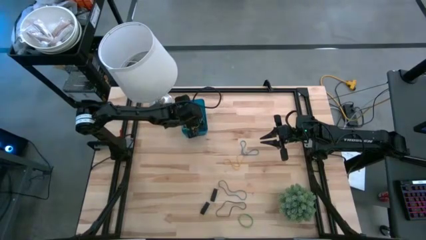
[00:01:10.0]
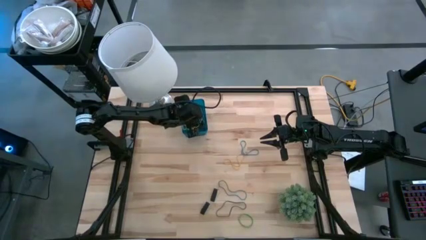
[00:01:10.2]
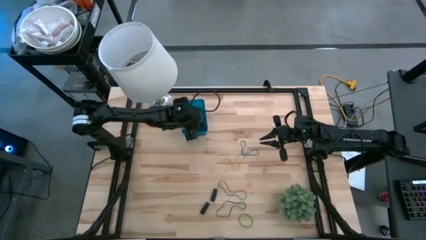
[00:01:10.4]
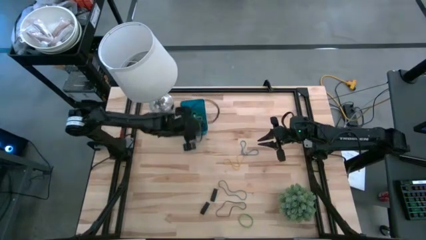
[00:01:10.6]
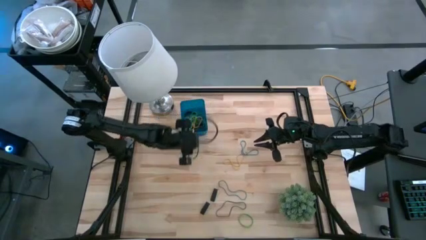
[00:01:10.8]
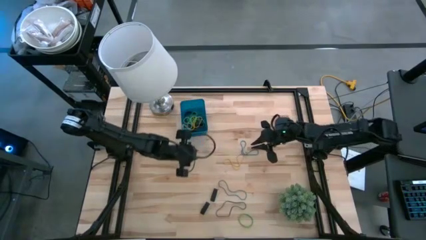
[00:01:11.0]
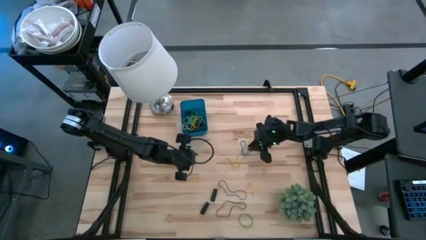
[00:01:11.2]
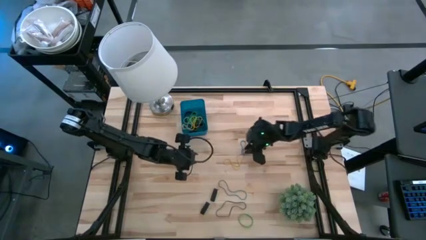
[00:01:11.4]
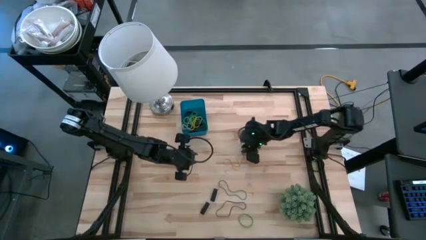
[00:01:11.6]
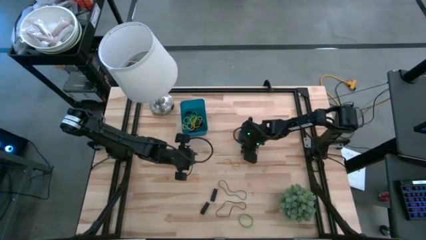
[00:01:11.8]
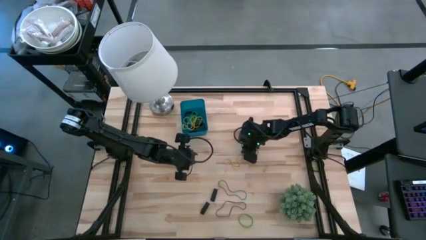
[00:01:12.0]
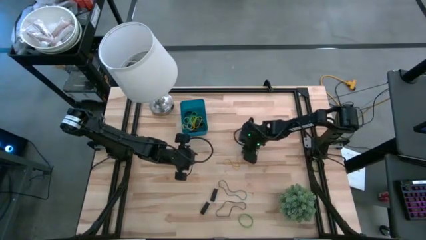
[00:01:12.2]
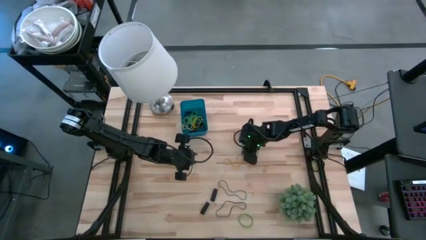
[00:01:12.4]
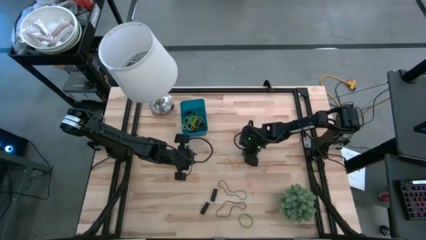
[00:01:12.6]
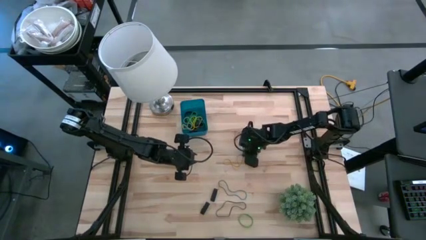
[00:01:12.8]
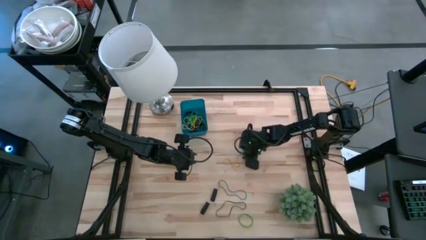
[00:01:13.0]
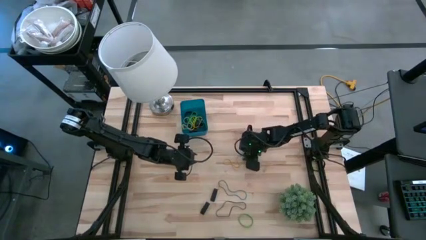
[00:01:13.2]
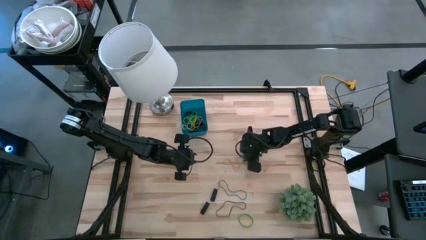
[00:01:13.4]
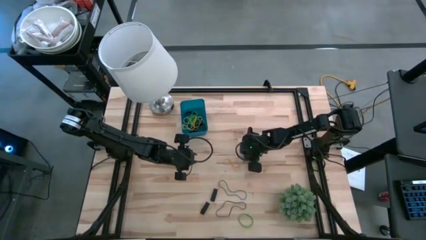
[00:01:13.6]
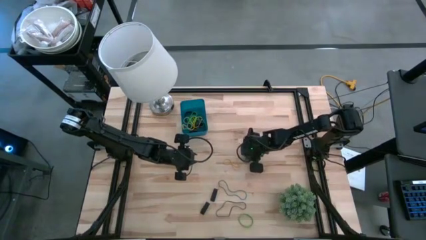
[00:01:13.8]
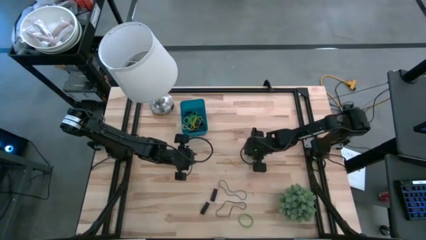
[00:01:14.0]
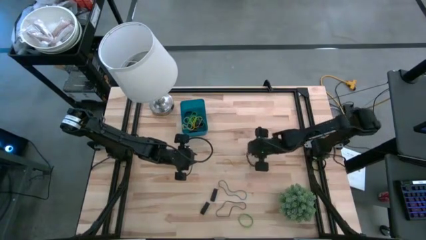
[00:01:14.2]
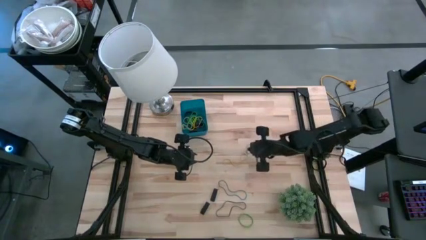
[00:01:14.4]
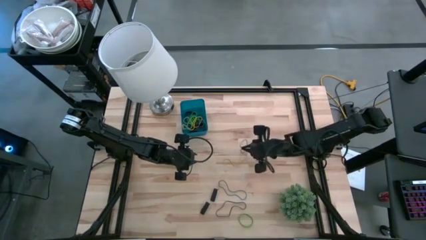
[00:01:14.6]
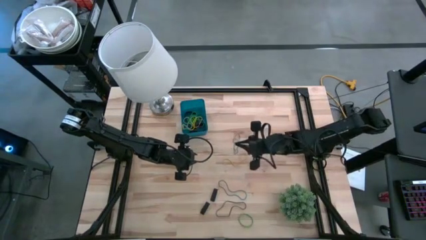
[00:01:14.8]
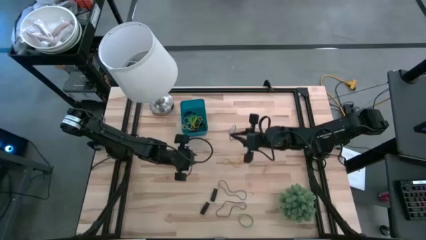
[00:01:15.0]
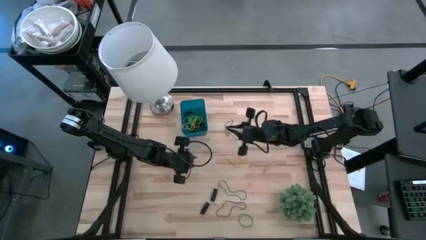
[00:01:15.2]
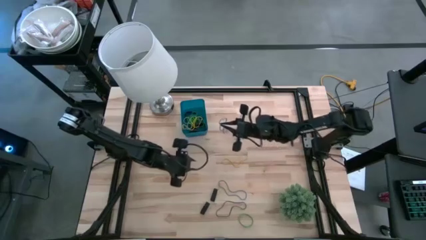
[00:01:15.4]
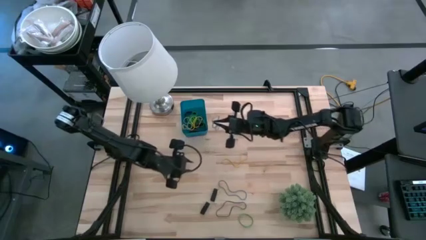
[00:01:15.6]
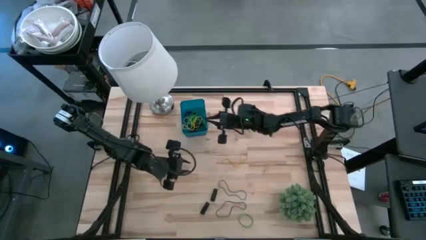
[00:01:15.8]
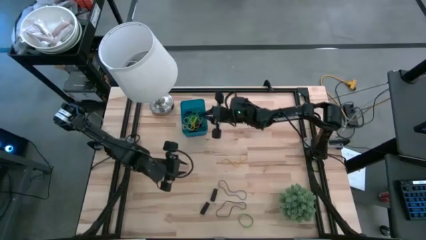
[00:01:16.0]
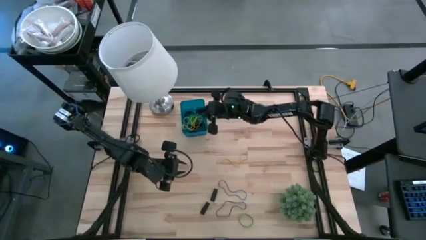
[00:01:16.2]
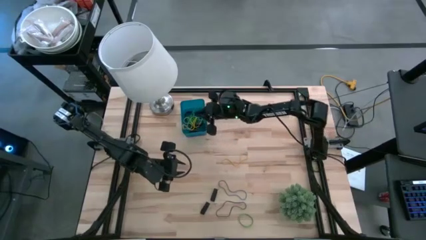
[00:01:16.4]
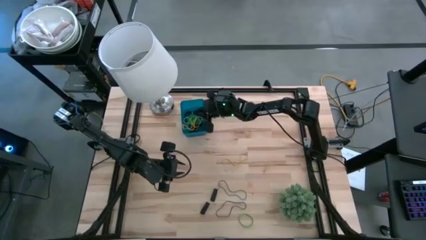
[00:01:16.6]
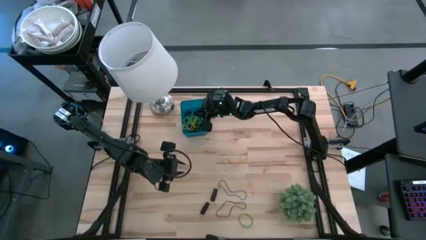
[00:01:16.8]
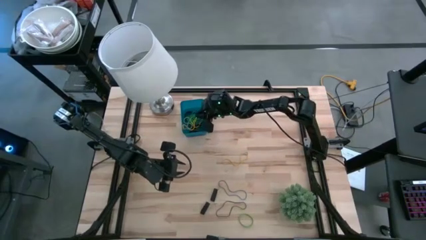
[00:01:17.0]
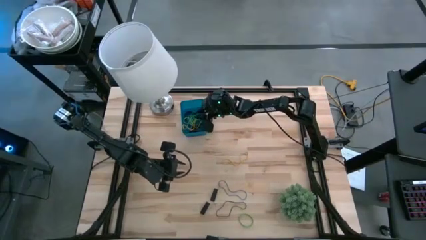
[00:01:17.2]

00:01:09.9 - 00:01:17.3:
Task: Pick and place rubber bands into bin
Put the top blue rubber band into the blue bin

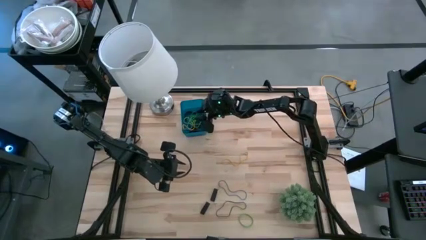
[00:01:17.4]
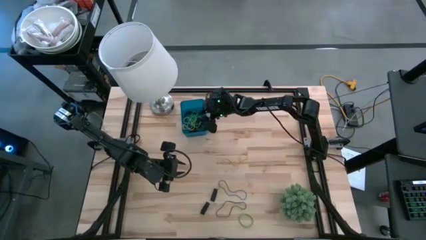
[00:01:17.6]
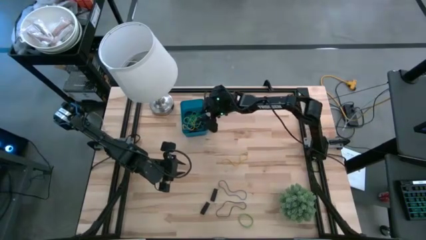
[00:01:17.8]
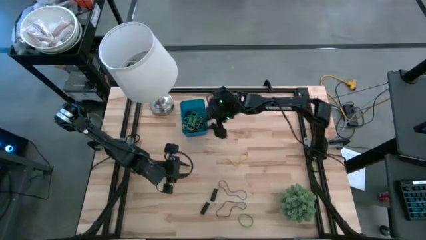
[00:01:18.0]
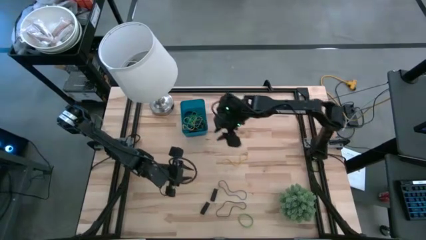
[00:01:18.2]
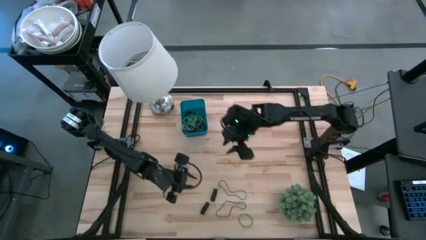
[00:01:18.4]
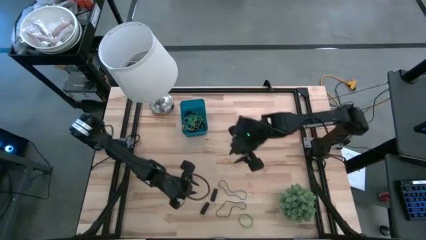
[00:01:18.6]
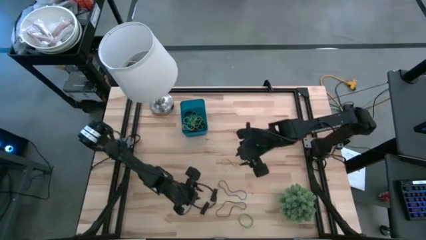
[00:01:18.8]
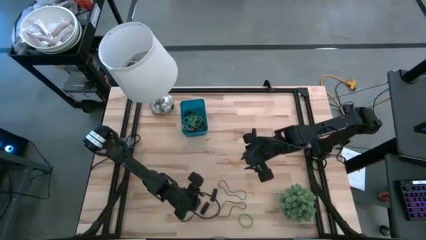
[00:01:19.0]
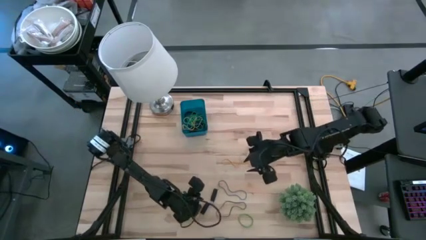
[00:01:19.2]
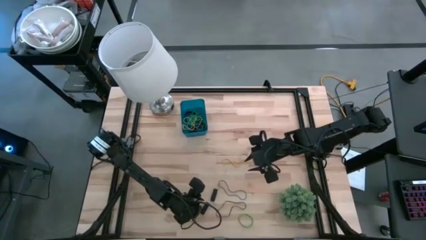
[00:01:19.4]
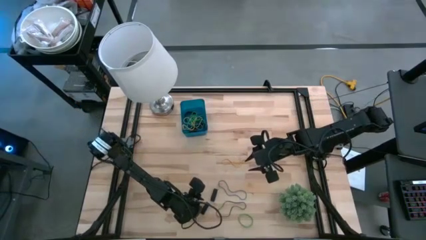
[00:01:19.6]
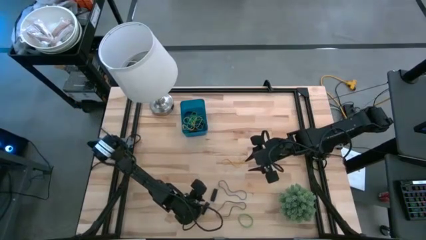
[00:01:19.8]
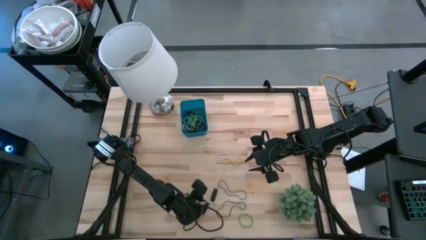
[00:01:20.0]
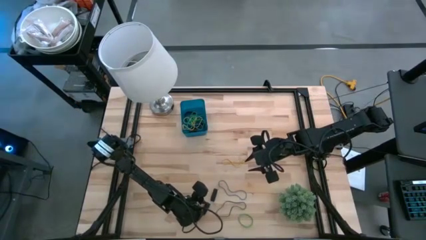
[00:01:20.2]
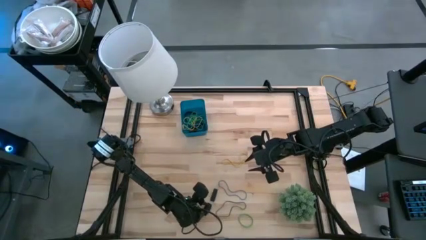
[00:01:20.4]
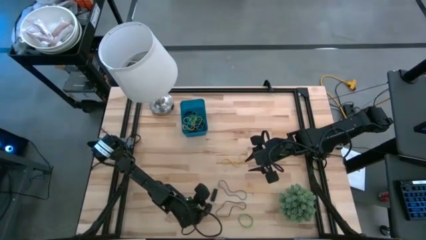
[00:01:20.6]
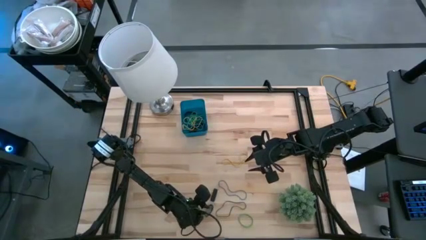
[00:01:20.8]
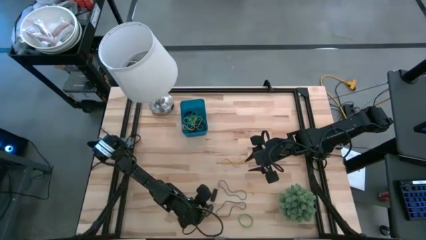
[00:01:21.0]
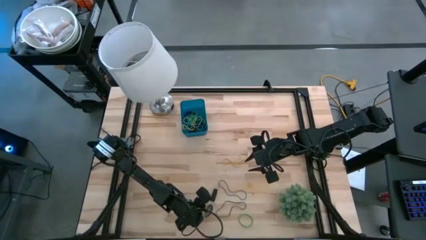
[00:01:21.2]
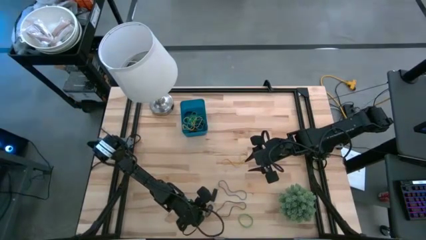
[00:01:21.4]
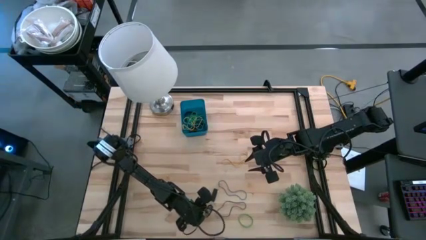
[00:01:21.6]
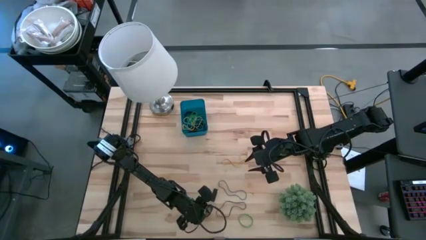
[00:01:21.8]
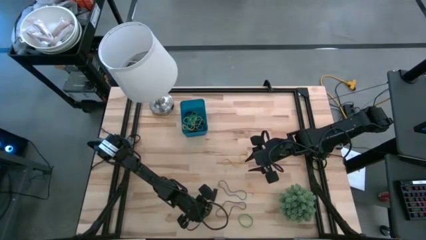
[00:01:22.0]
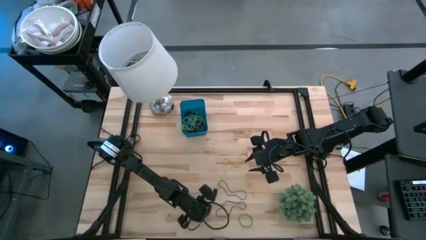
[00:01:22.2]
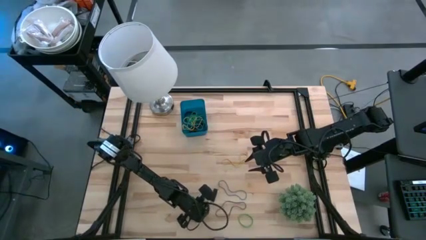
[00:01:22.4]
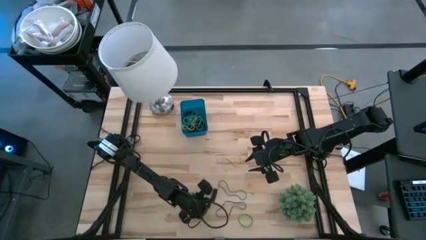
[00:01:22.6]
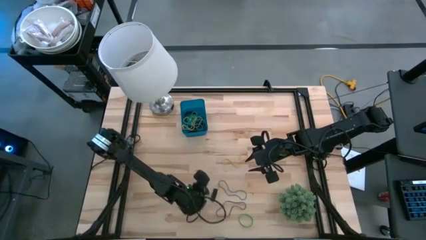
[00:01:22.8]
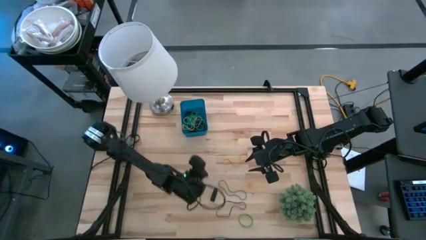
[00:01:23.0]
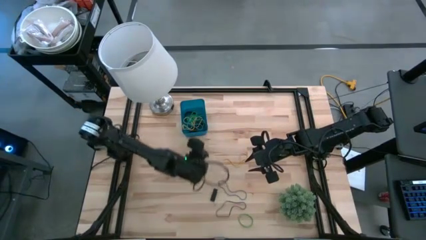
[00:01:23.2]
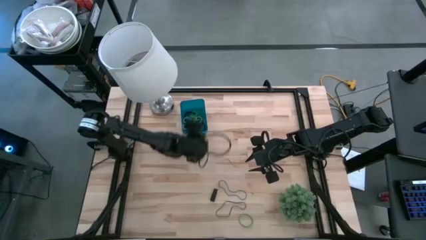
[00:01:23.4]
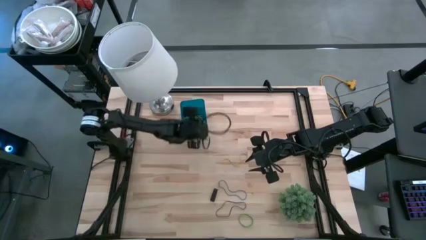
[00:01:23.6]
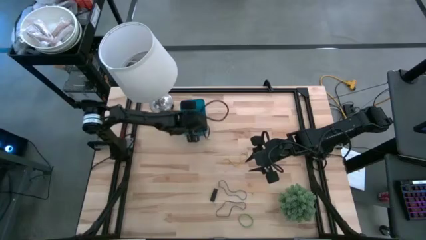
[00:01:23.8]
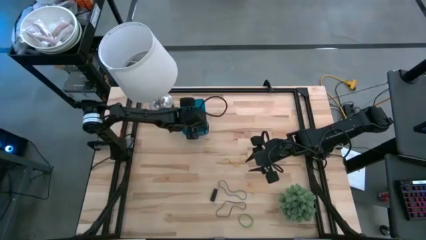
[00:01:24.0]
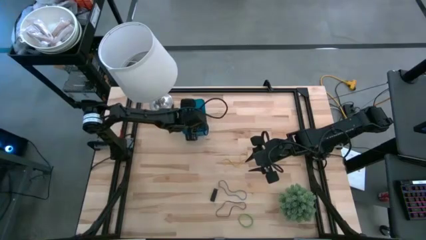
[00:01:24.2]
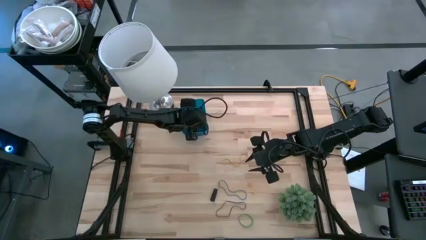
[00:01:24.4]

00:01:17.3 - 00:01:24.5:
Put the bottom black rubber band into the blue bin
